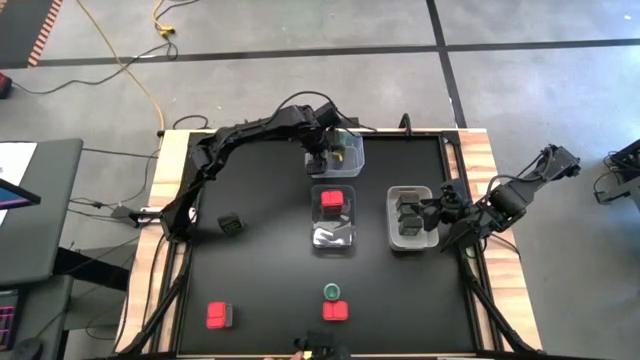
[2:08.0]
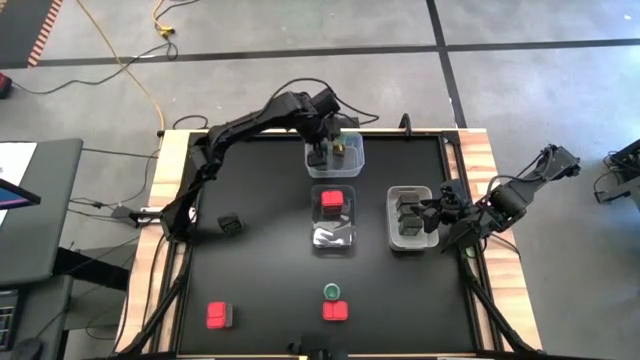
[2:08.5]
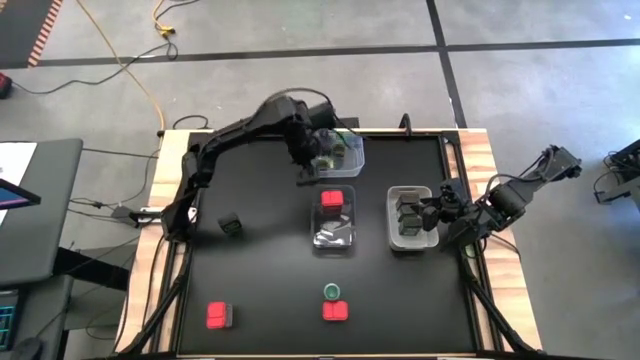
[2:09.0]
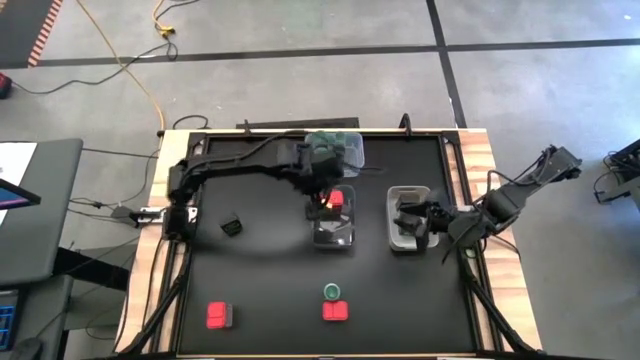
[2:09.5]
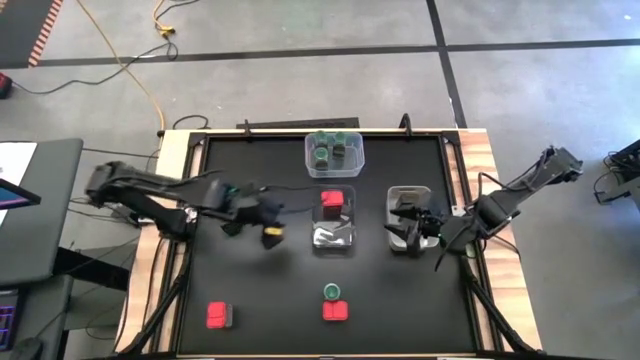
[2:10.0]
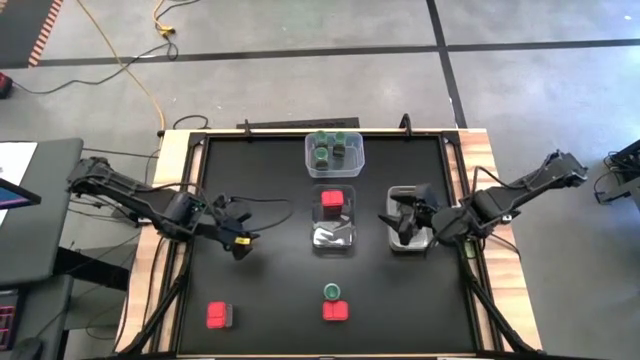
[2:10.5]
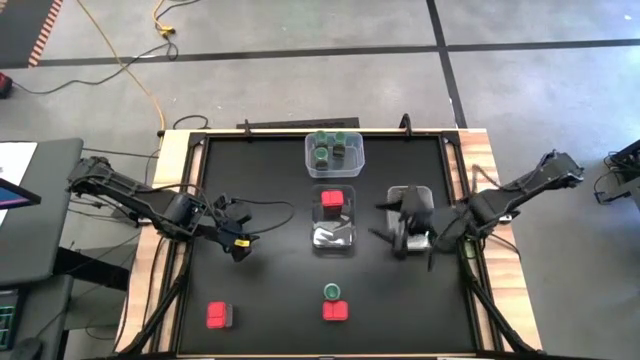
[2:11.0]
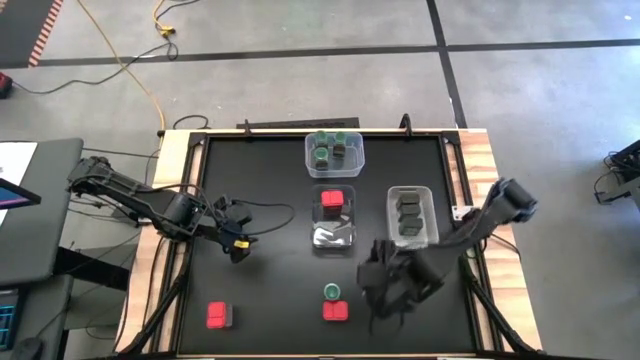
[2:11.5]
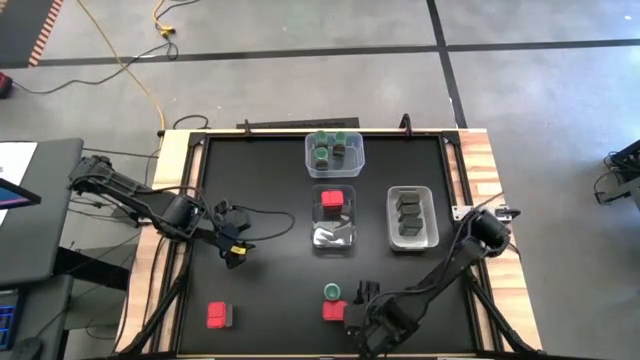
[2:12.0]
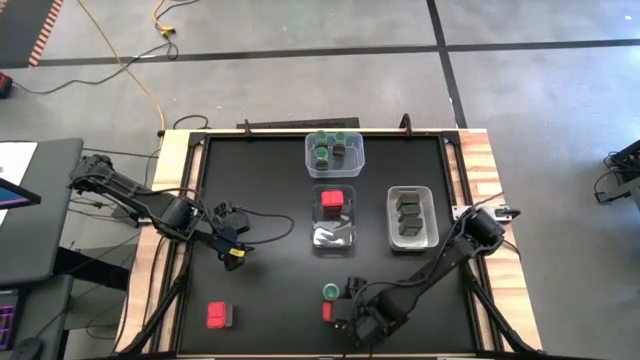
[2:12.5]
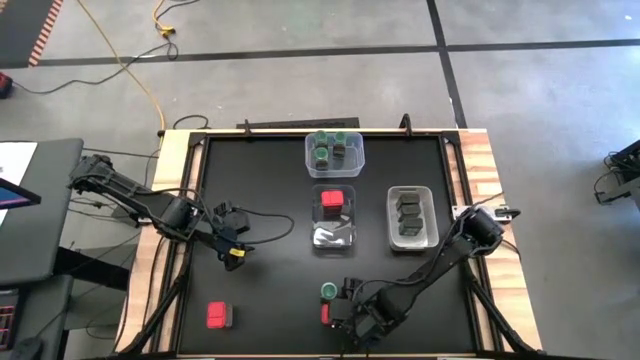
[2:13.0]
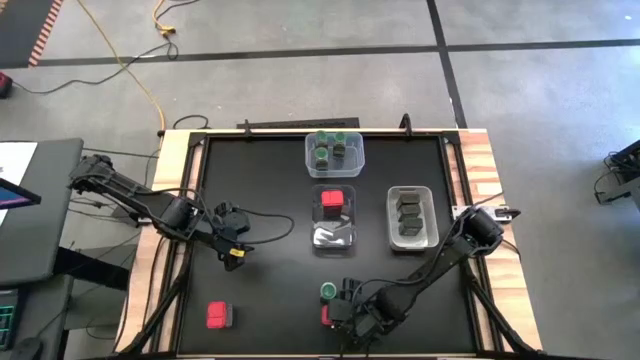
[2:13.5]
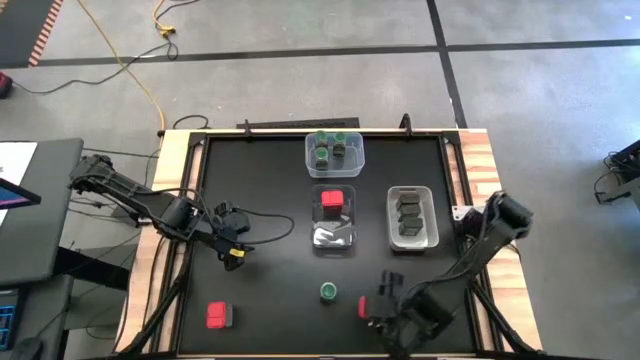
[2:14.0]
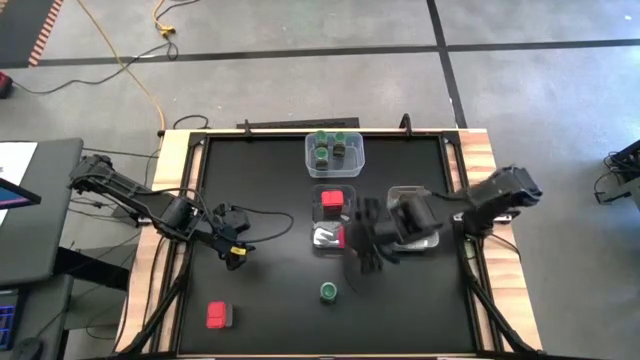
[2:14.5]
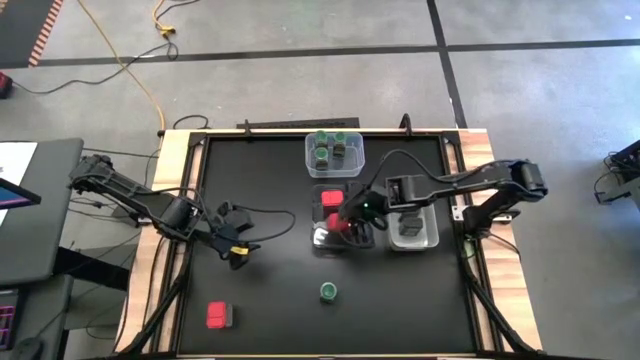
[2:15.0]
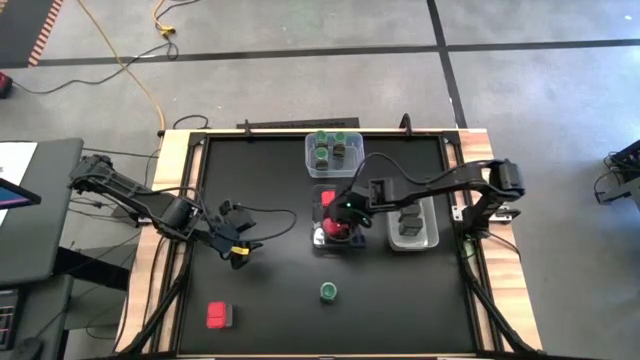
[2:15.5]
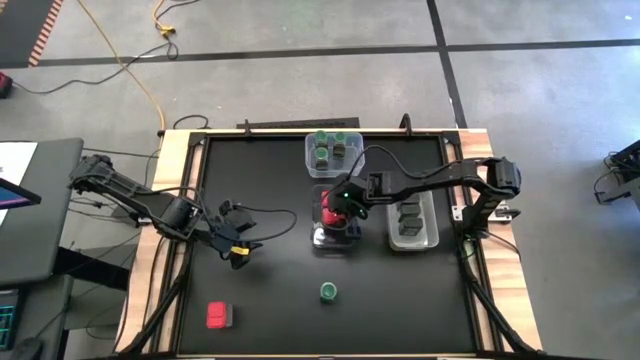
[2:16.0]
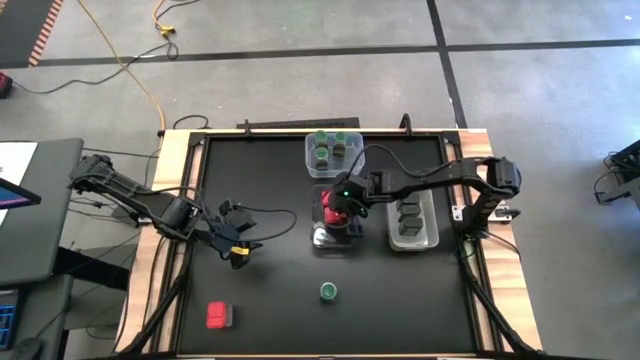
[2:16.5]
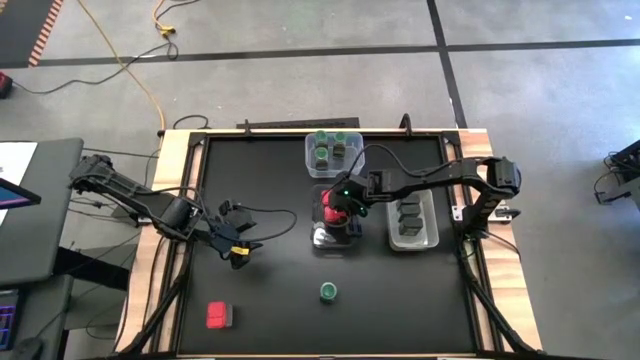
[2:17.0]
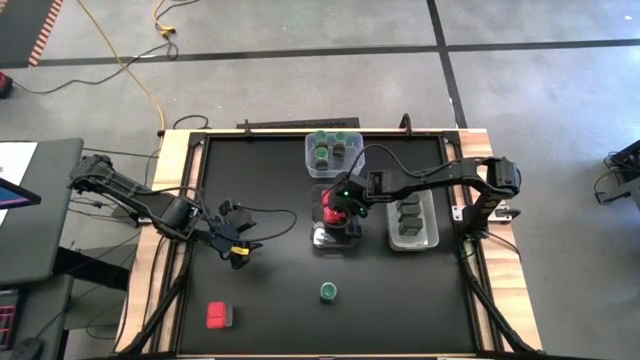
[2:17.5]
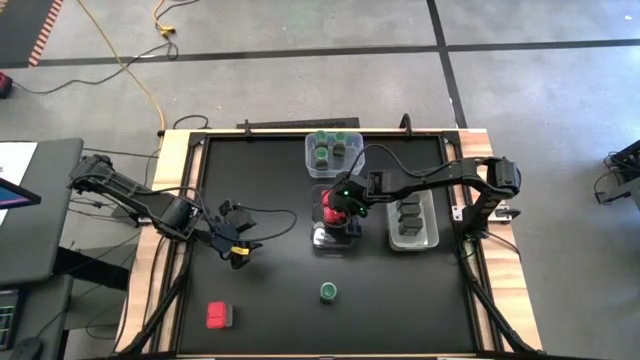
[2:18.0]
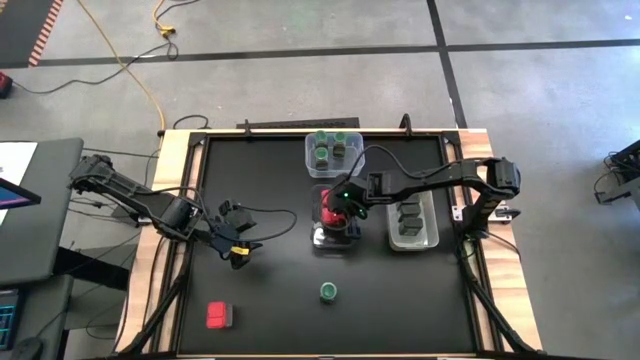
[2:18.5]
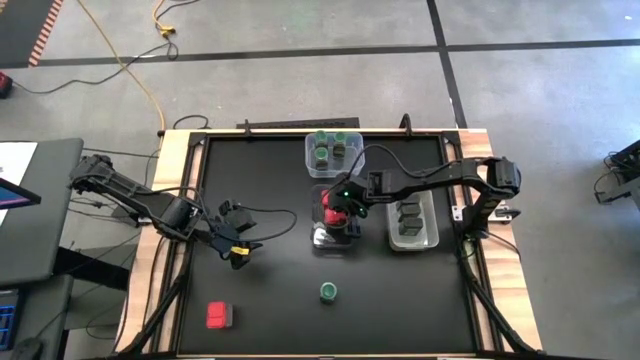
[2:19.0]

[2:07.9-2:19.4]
Task: Sort spices by type
Put the red seasoning can into the black transparent bin

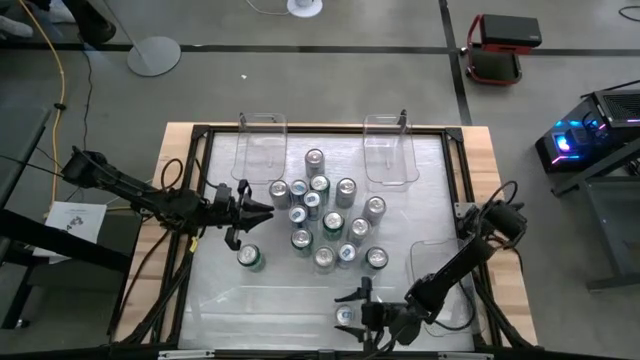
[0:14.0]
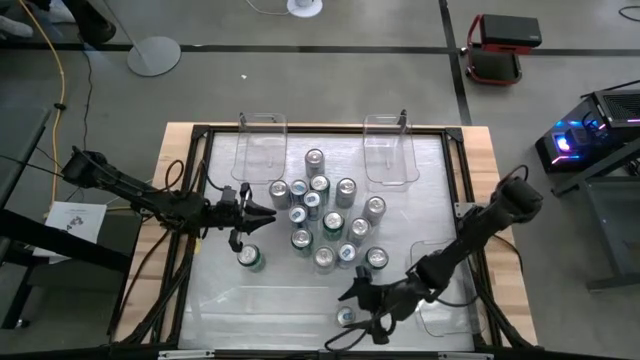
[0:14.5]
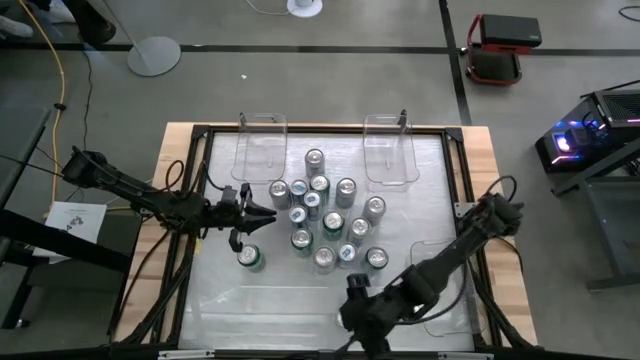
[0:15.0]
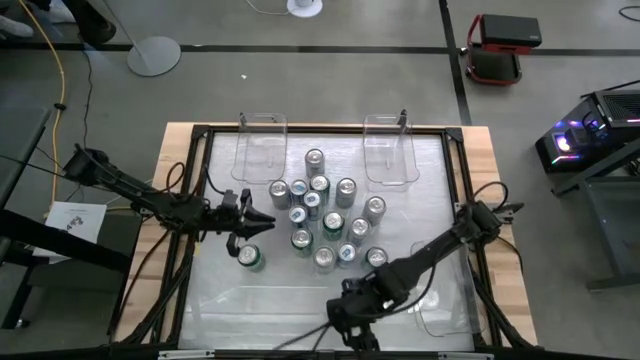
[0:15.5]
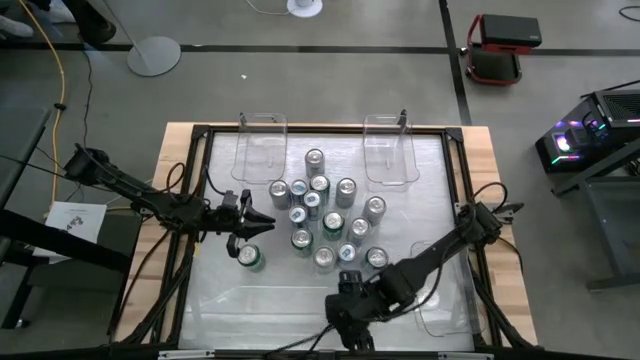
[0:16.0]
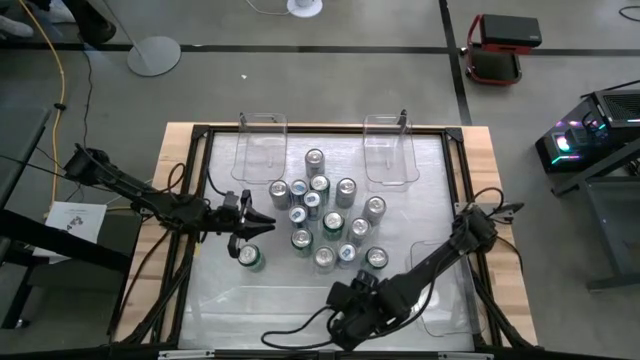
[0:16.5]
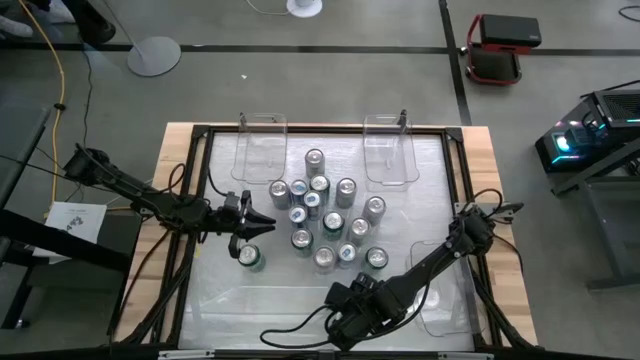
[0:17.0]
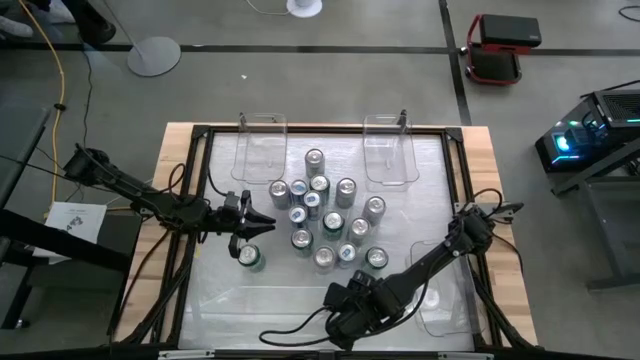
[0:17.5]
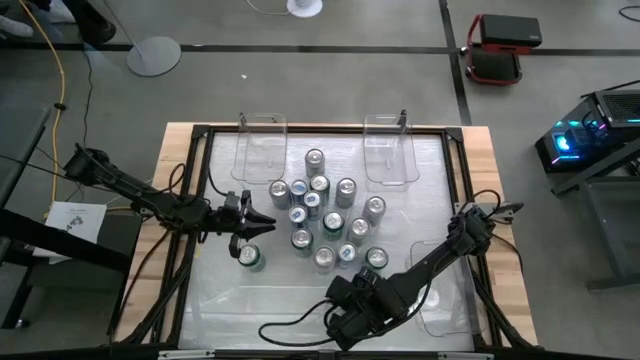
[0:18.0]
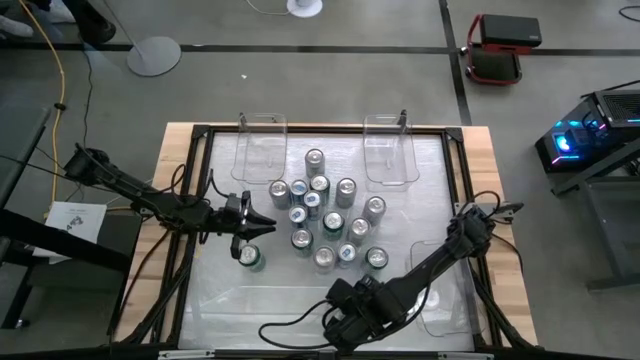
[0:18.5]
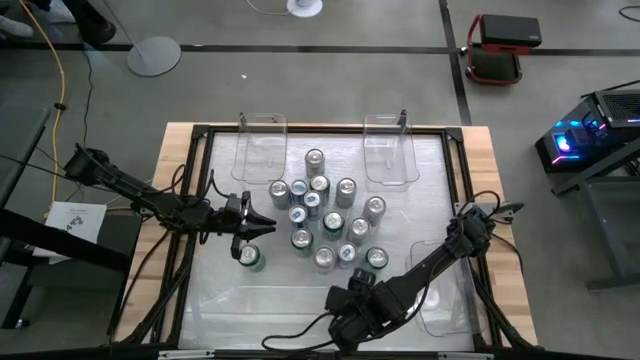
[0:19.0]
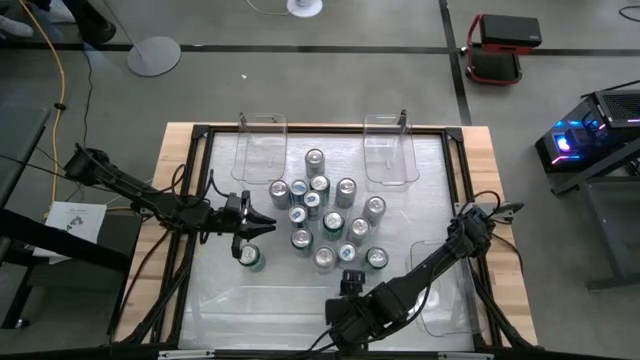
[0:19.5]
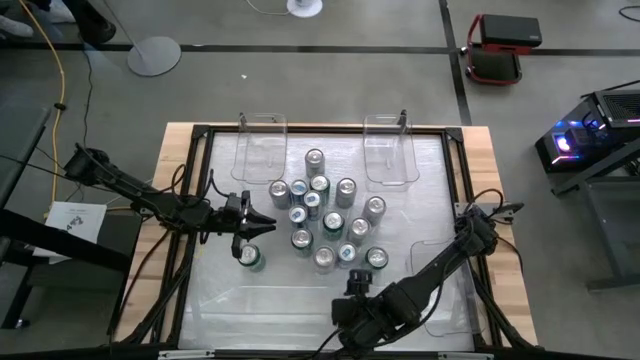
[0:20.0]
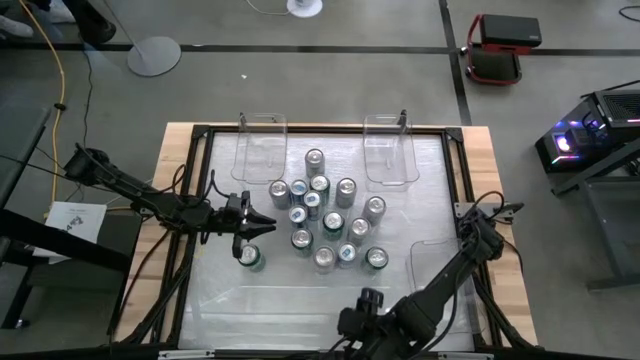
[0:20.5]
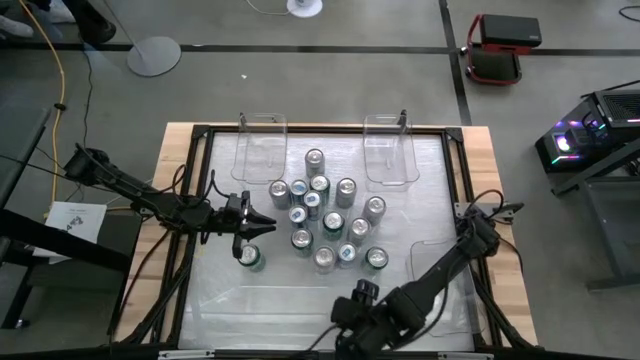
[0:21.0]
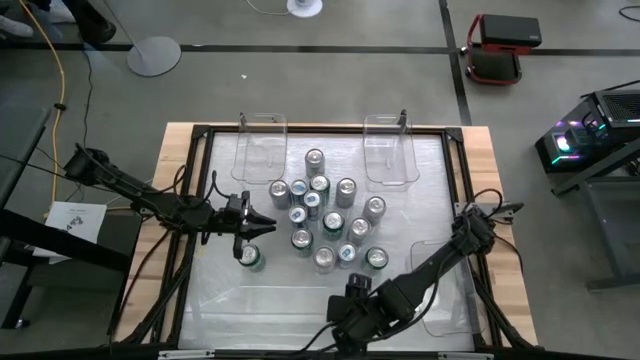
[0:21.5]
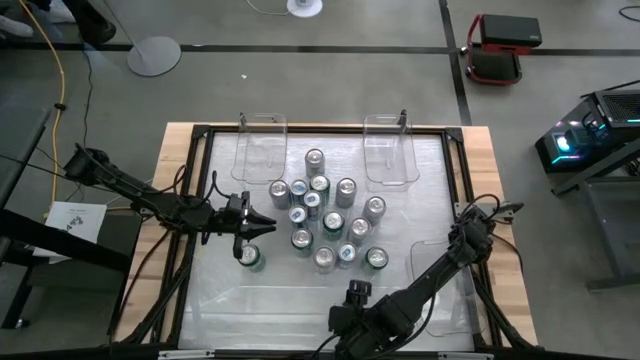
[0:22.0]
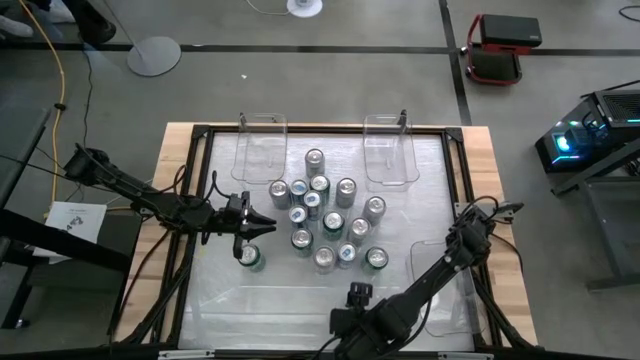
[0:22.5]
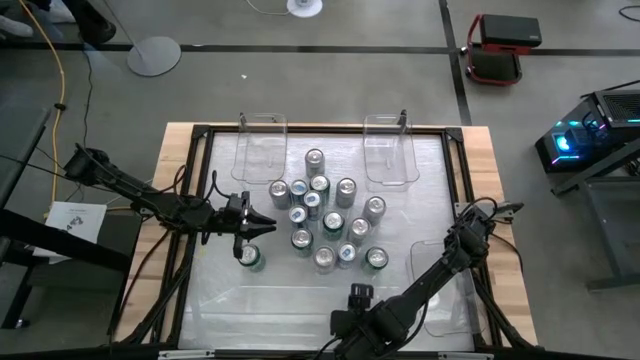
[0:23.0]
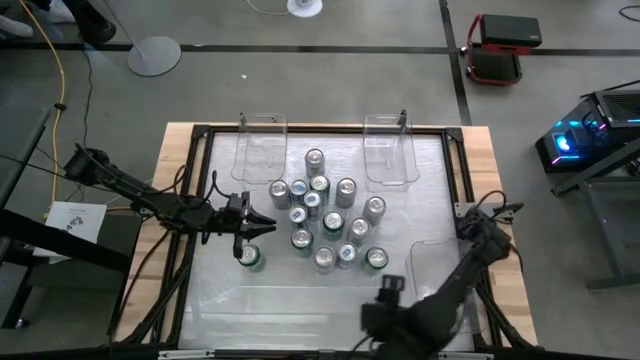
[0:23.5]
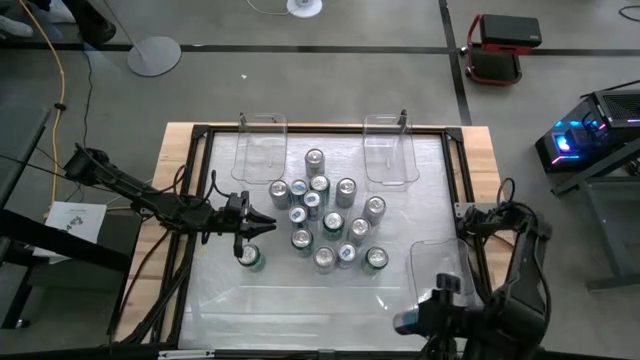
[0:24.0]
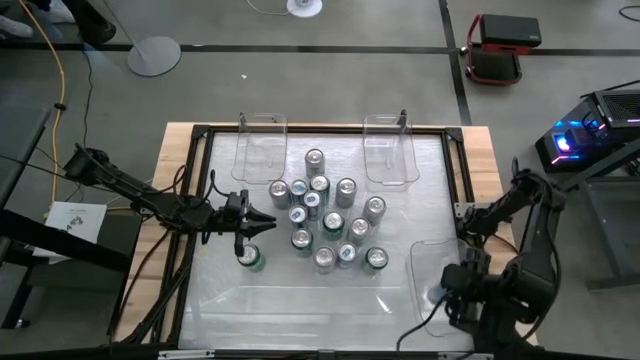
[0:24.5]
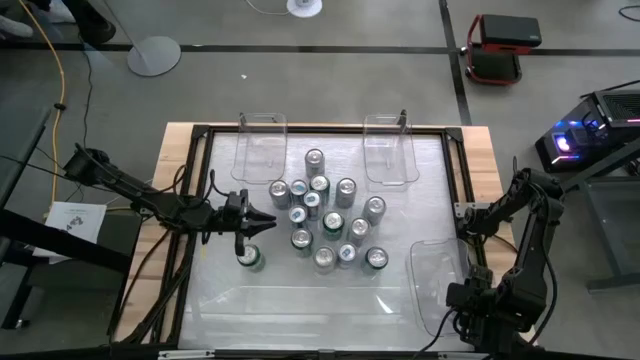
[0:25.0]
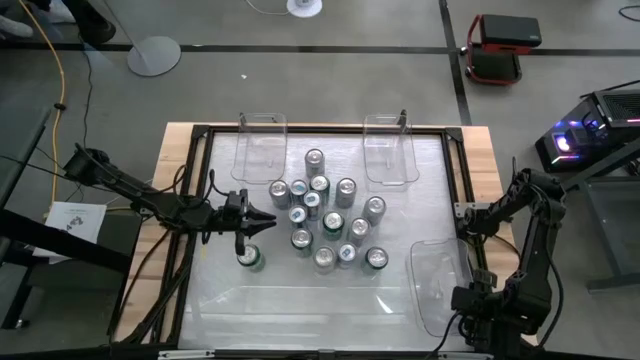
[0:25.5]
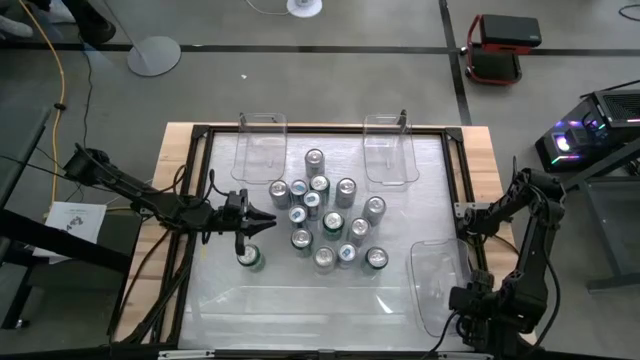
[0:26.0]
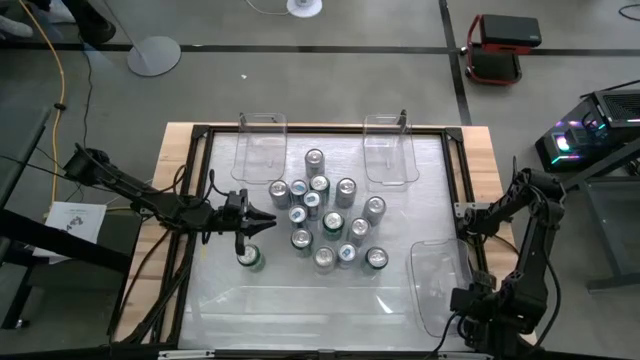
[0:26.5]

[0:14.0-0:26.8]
Task: Sort soda cans
Put the blue soda can into the bottom right transparent bin
